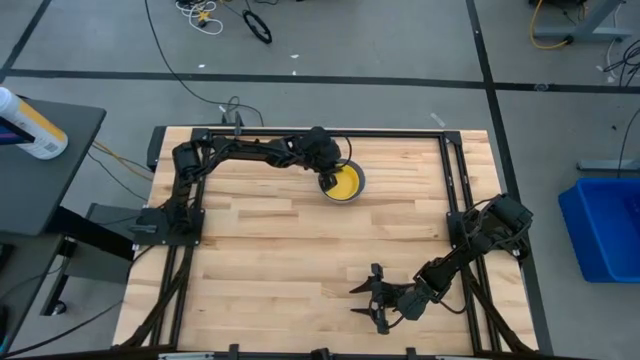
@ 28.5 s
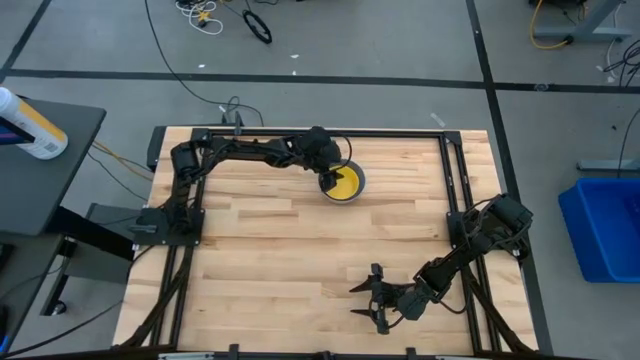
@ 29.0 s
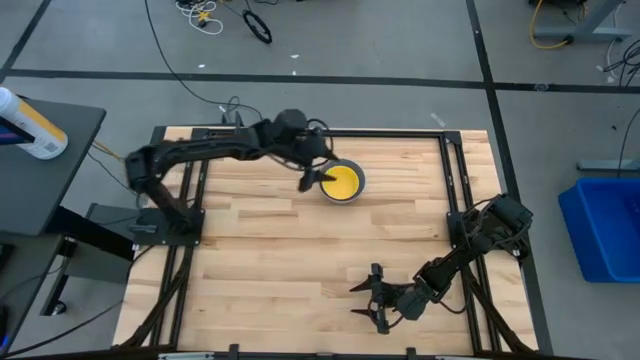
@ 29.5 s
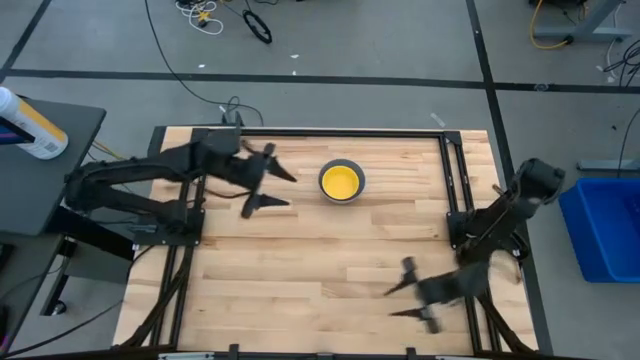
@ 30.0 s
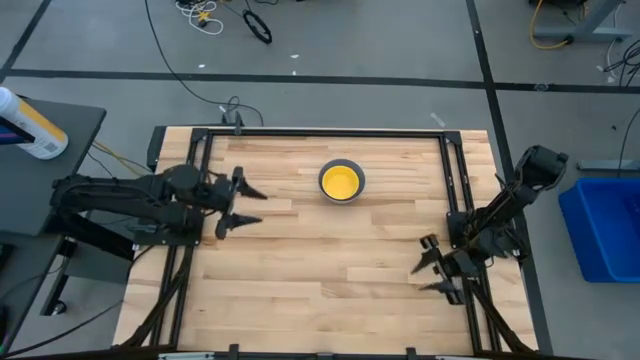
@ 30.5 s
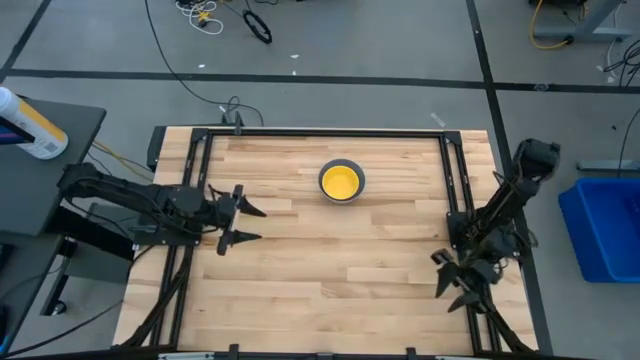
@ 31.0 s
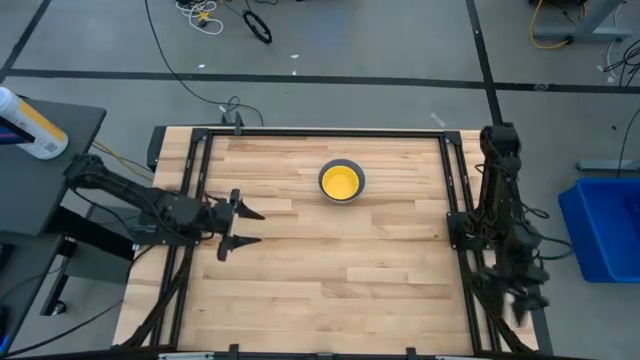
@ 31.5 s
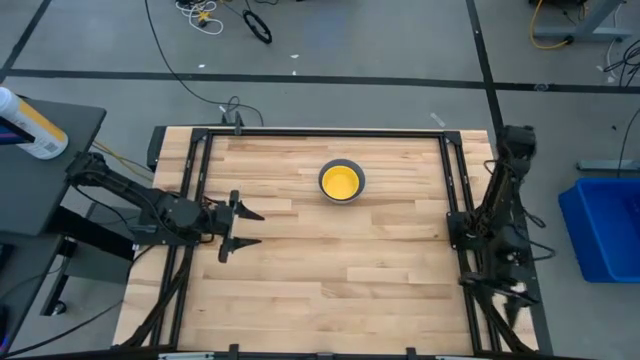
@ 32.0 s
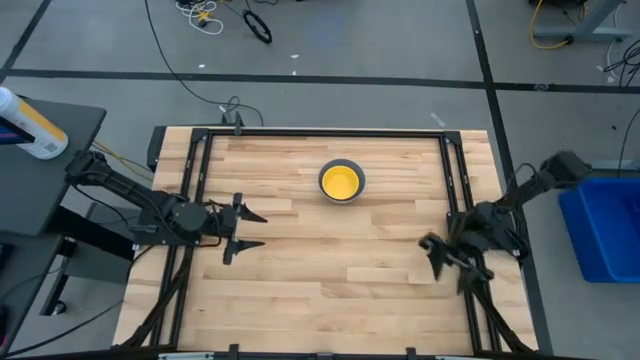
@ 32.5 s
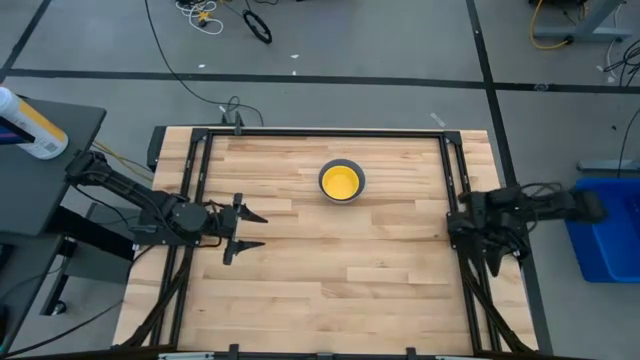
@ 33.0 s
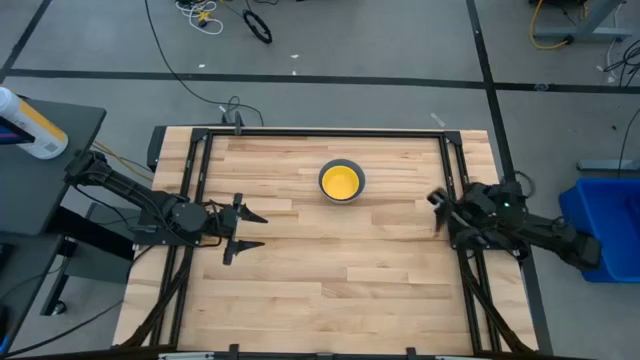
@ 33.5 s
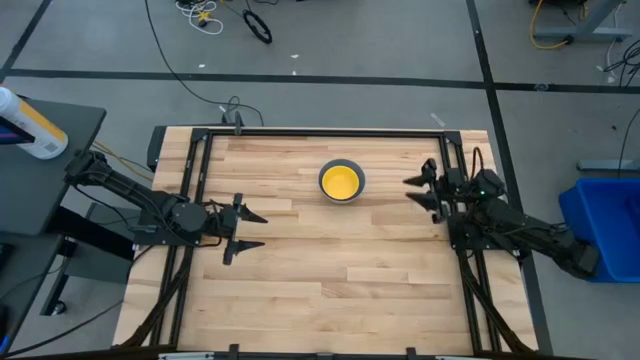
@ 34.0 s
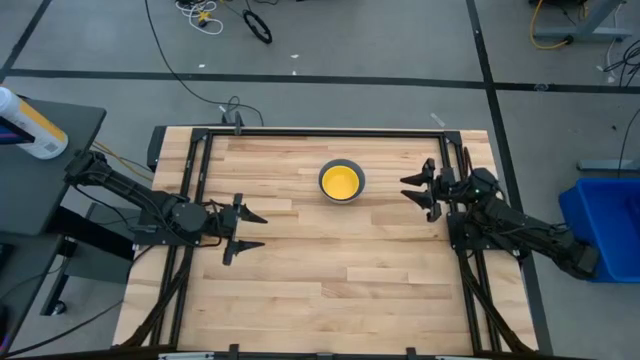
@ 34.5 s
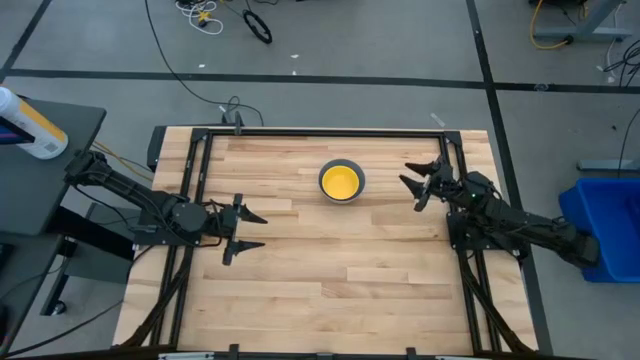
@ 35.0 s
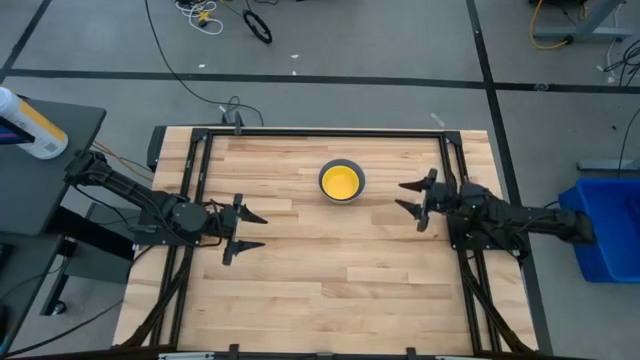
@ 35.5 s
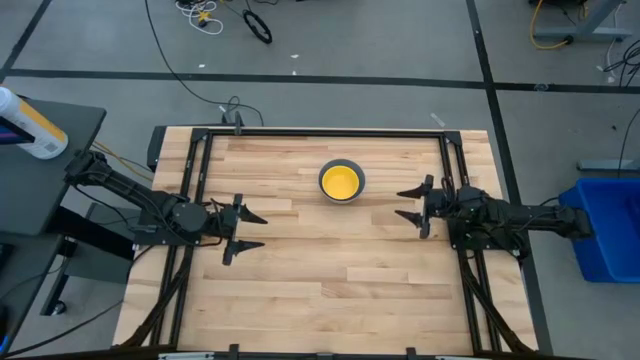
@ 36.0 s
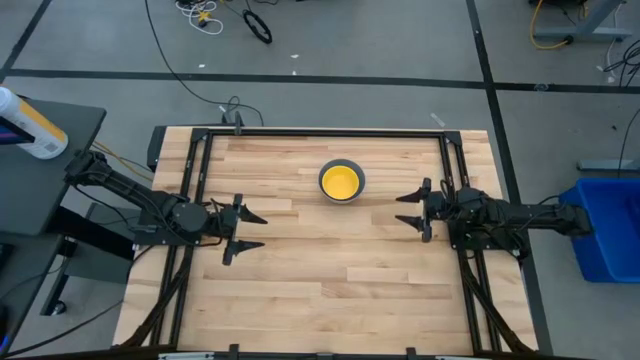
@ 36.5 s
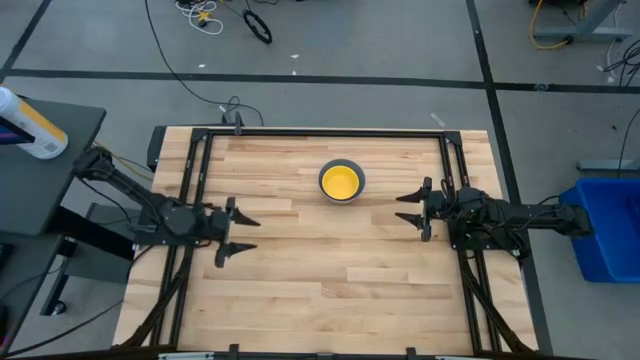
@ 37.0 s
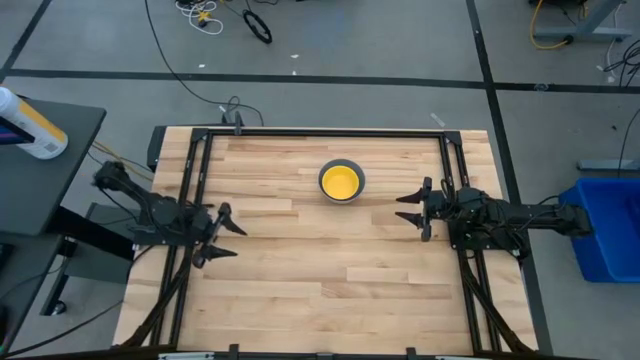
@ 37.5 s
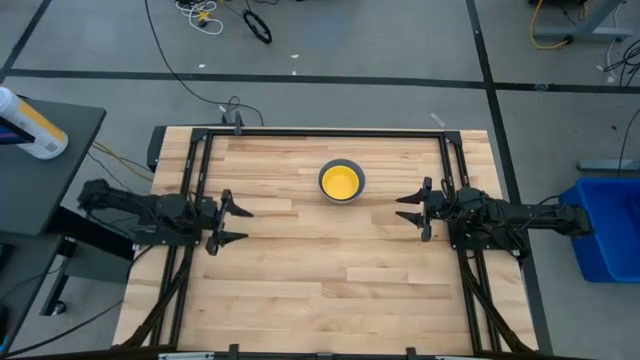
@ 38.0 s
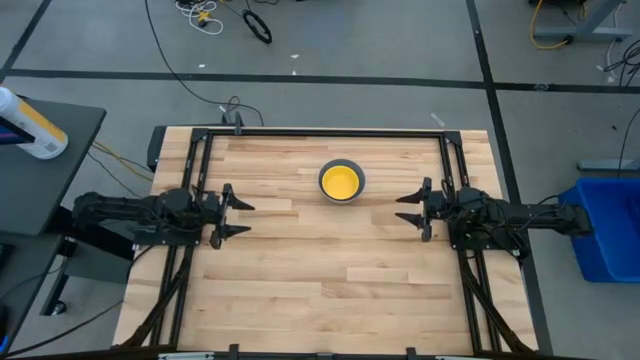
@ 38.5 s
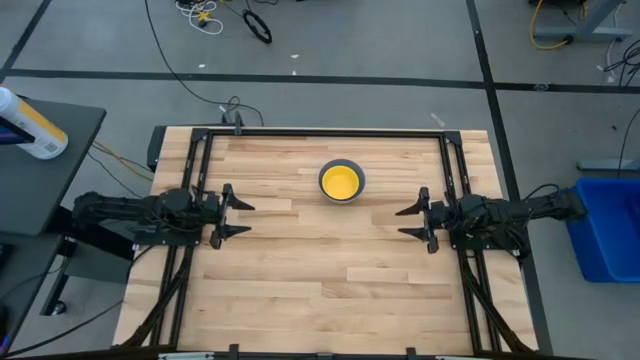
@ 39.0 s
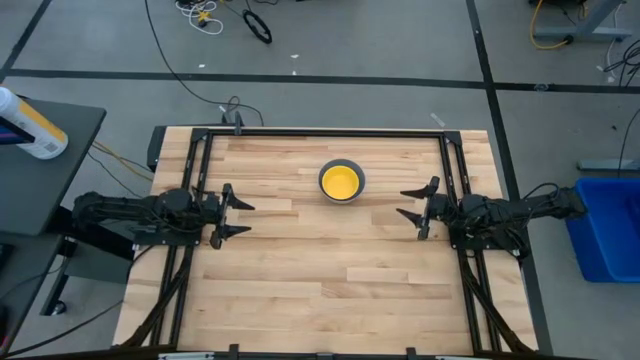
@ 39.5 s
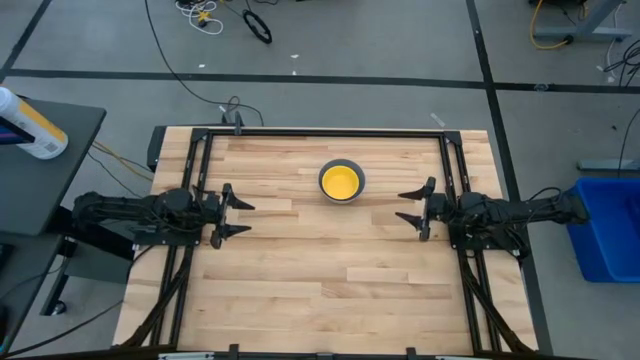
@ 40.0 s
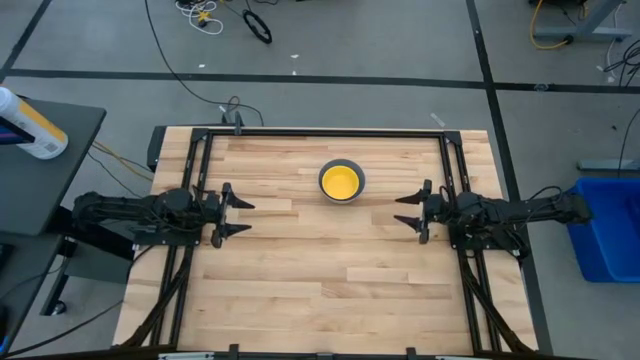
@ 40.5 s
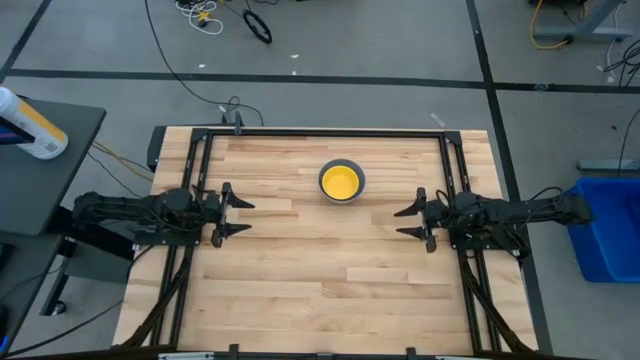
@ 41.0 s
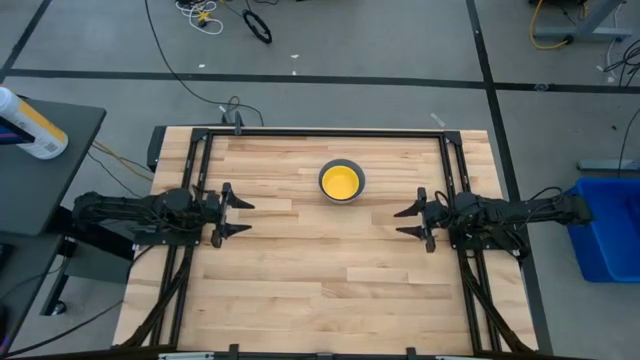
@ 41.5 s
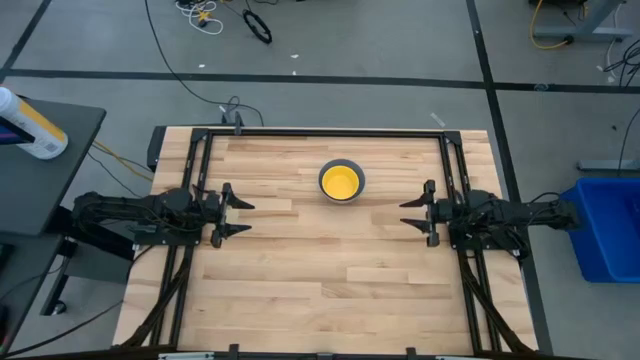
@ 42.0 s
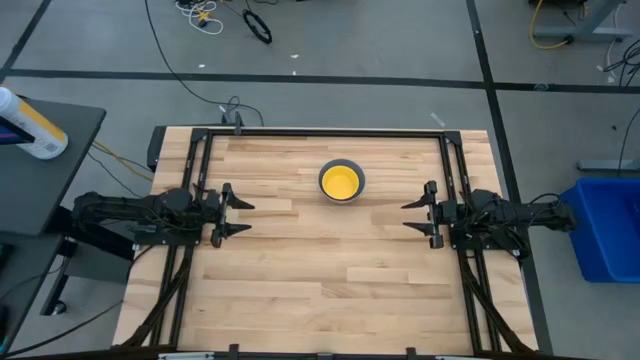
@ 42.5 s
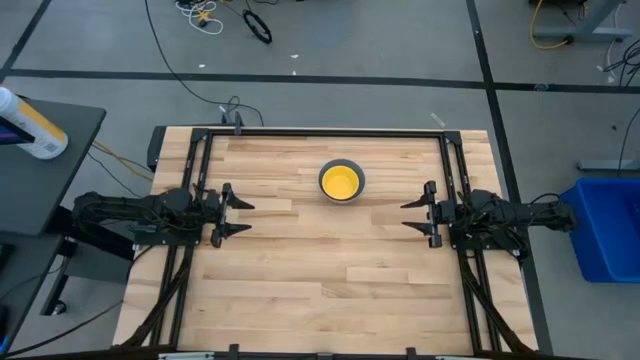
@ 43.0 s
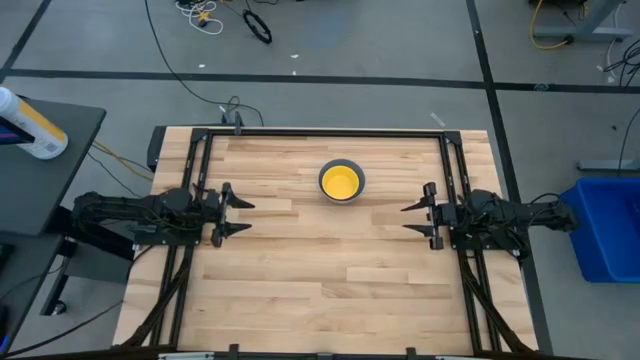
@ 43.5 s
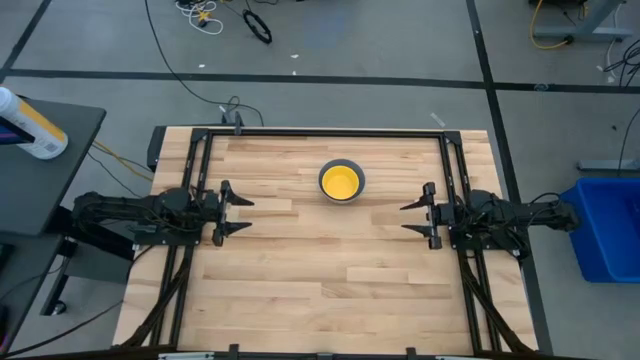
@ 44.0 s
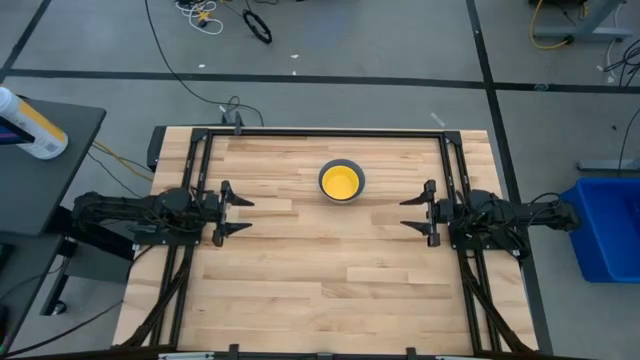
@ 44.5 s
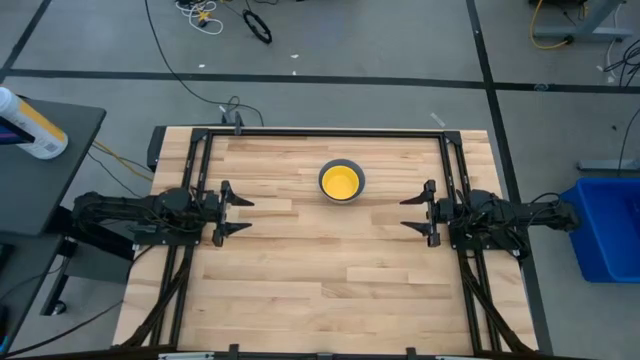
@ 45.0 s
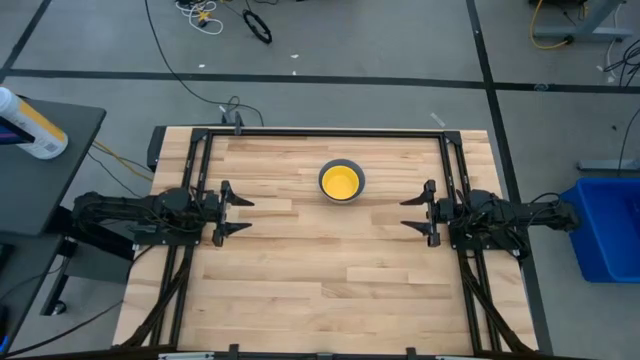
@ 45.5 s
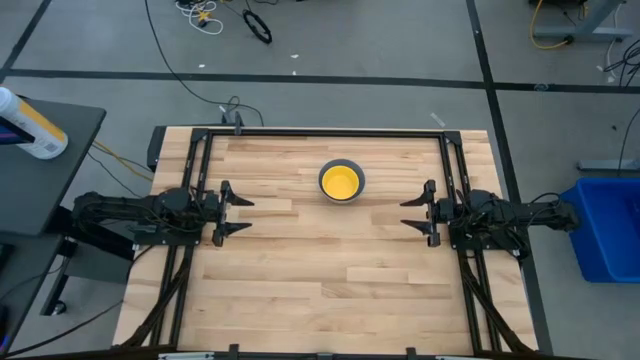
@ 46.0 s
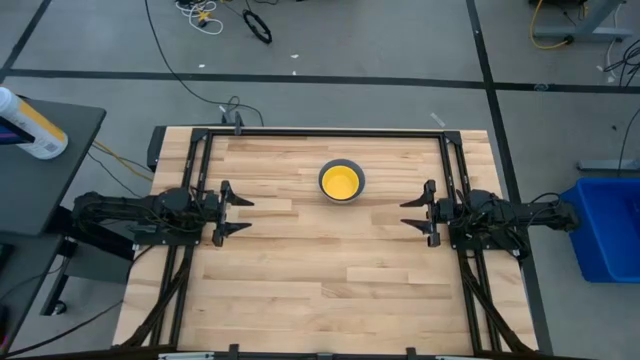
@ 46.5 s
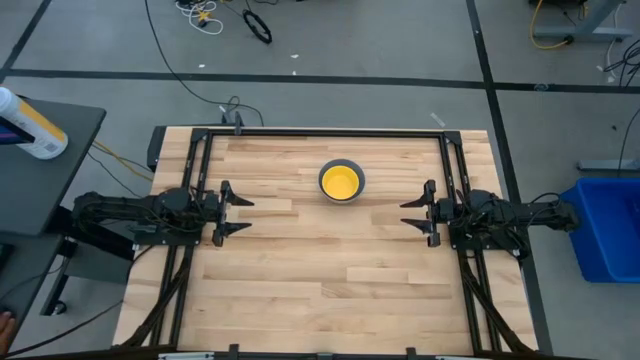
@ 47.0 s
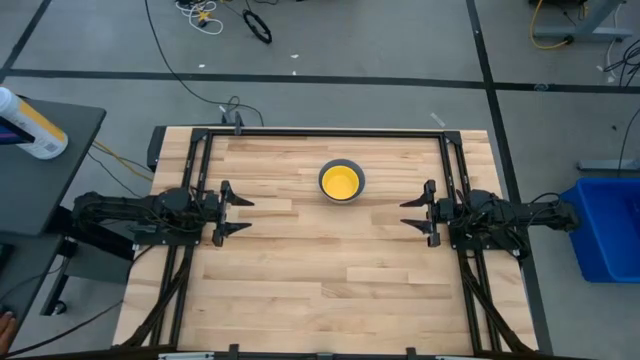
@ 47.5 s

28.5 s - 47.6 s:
Return to home position

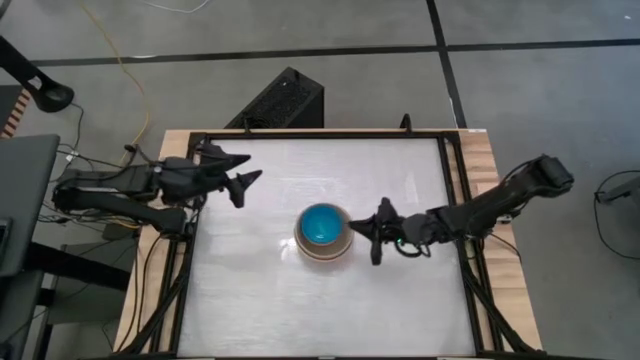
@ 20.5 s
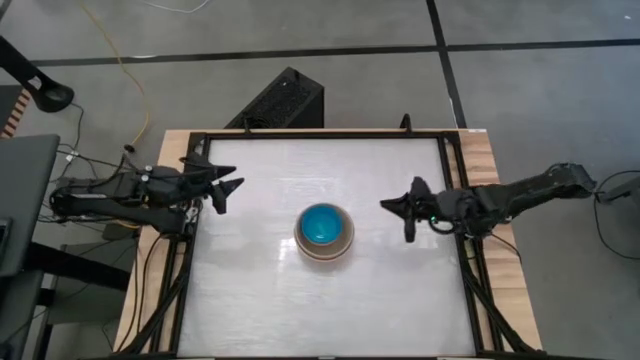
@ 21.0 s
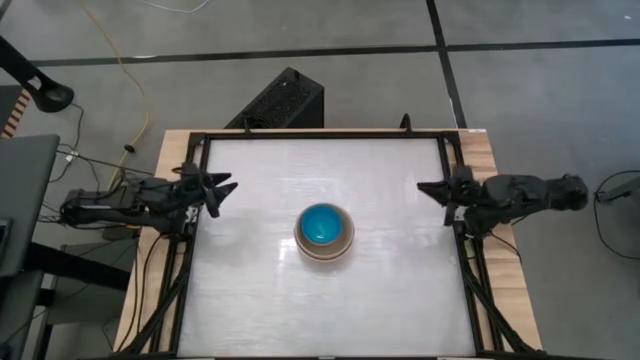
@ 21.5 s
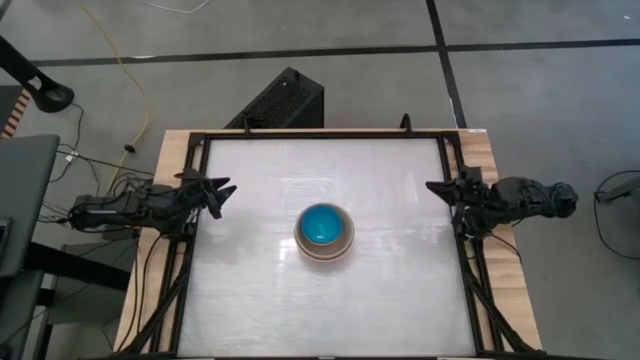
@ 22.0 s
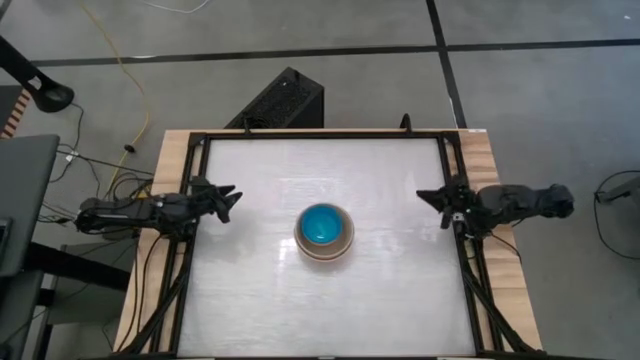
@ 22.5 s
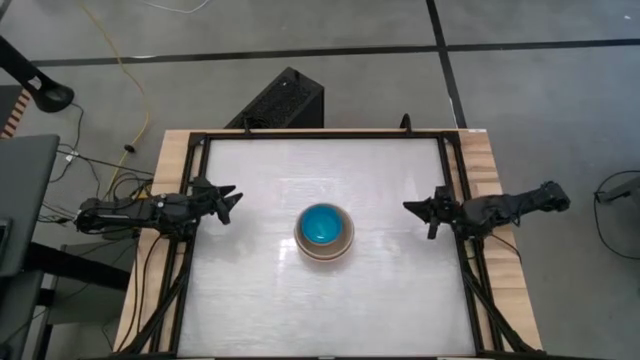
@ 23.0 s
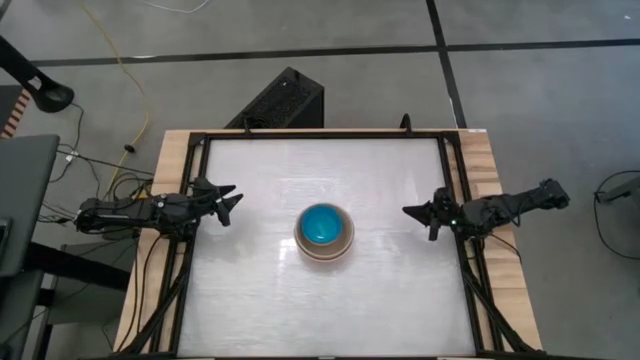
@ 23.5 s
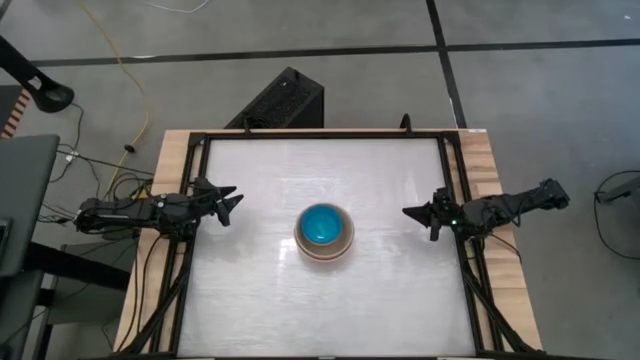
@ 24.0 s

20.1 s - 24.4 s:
Return to Home Position
